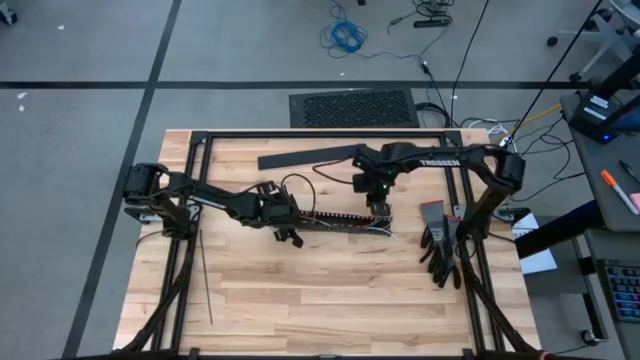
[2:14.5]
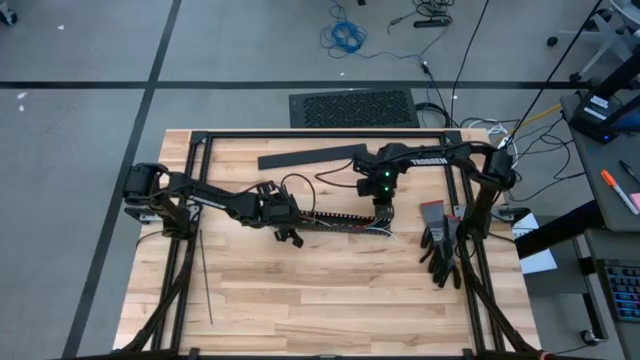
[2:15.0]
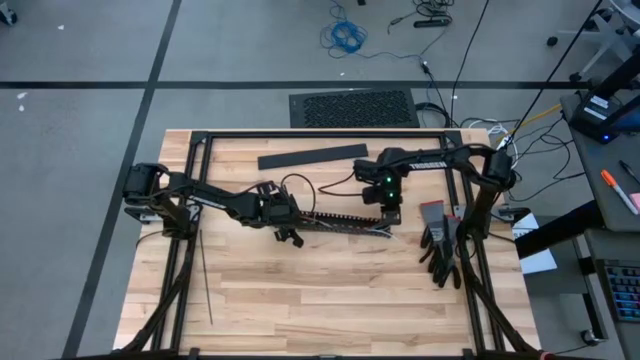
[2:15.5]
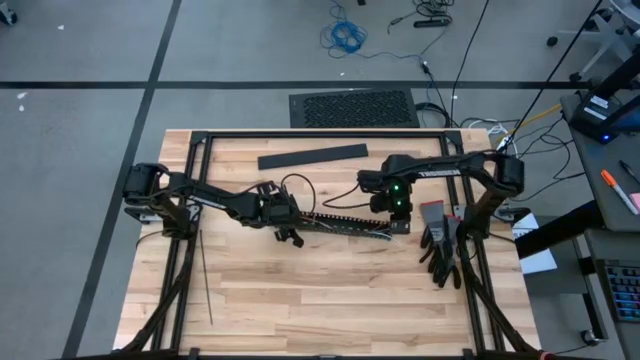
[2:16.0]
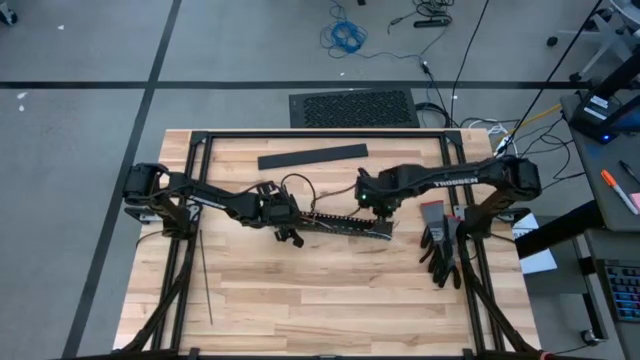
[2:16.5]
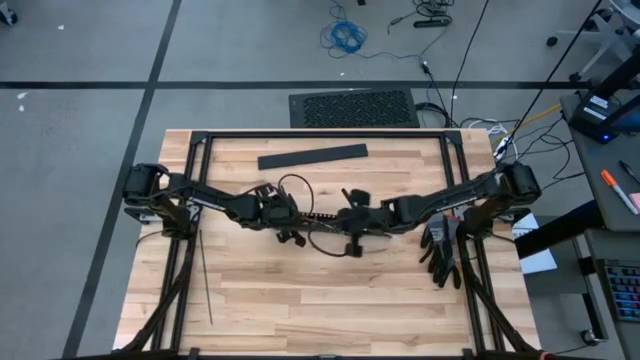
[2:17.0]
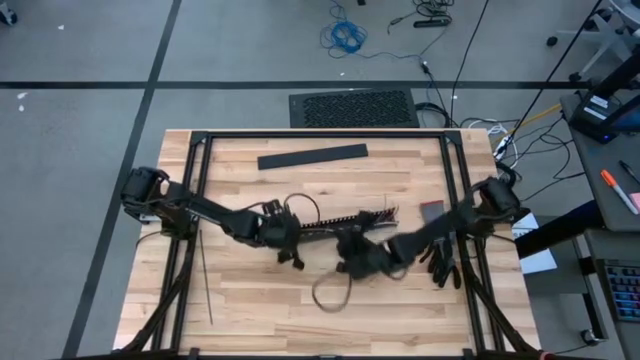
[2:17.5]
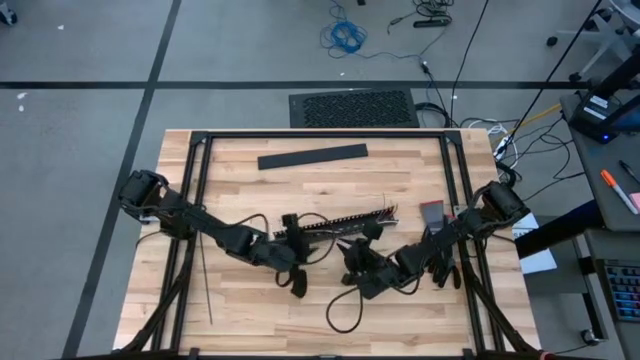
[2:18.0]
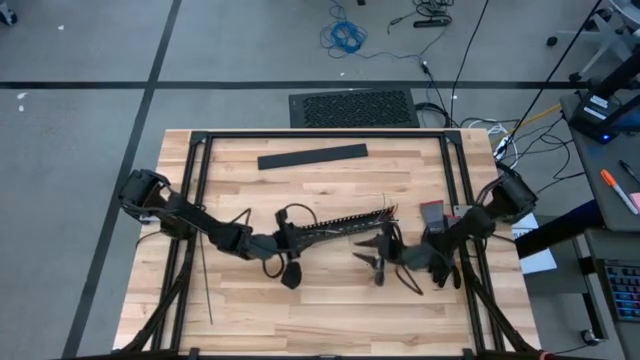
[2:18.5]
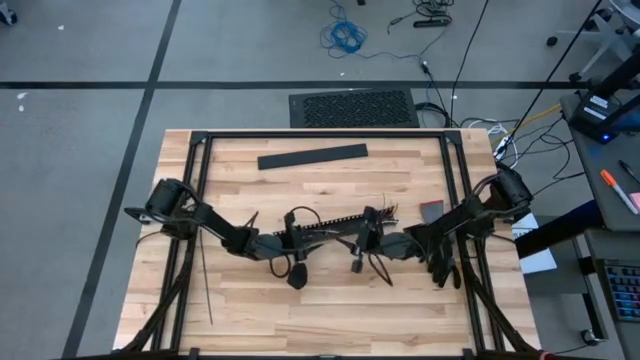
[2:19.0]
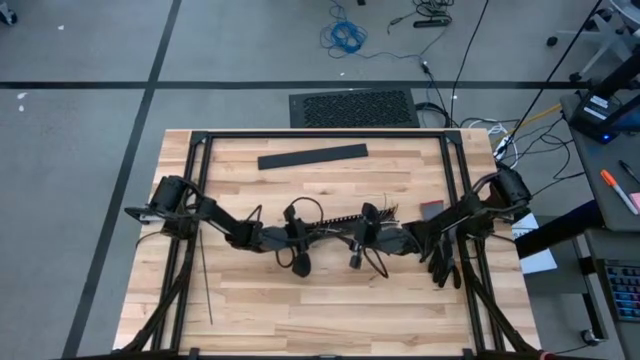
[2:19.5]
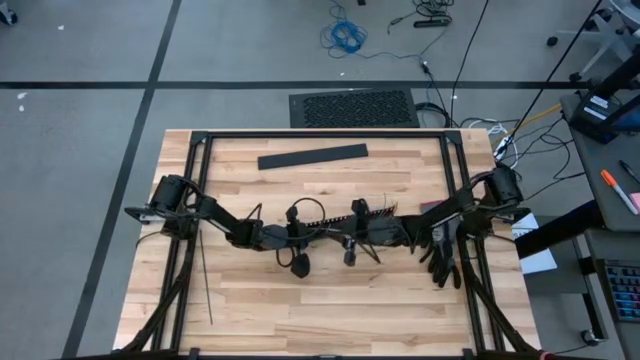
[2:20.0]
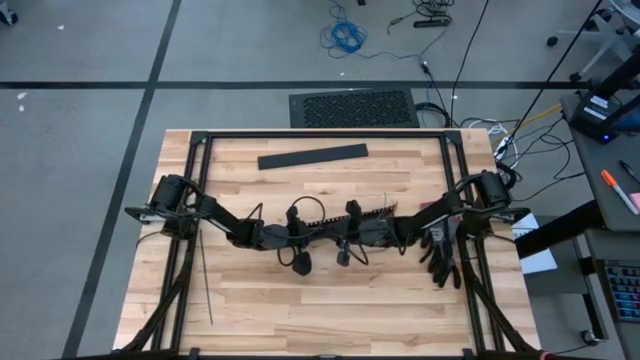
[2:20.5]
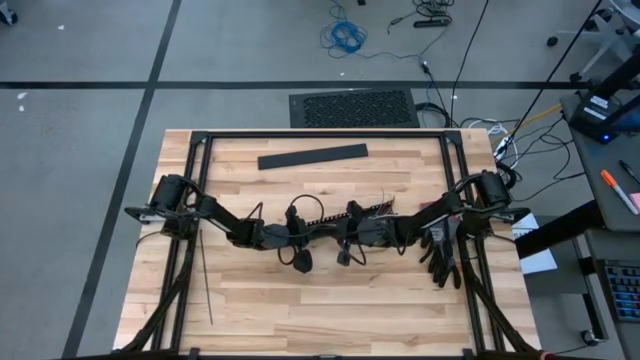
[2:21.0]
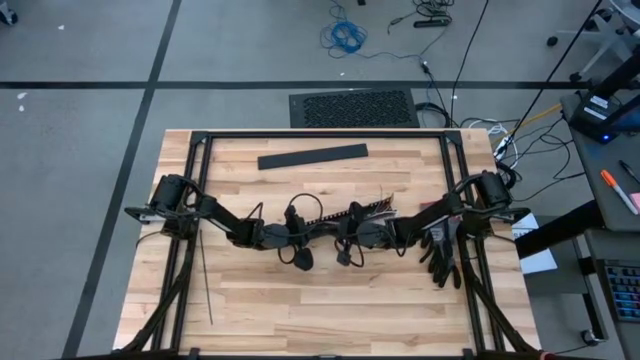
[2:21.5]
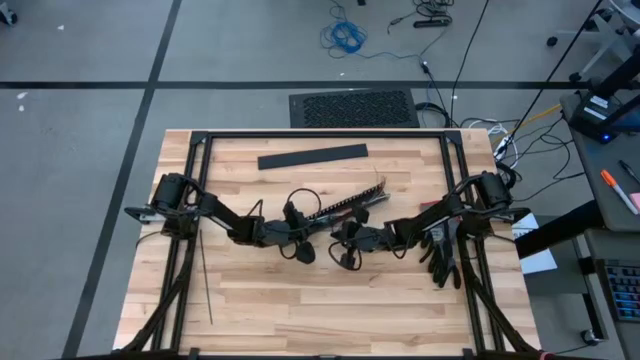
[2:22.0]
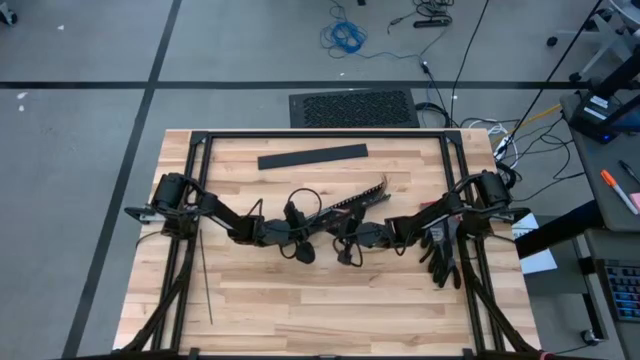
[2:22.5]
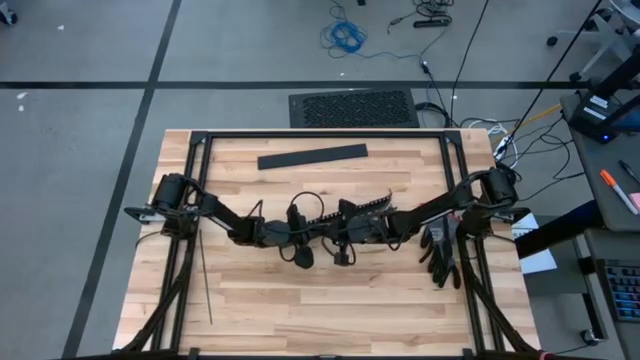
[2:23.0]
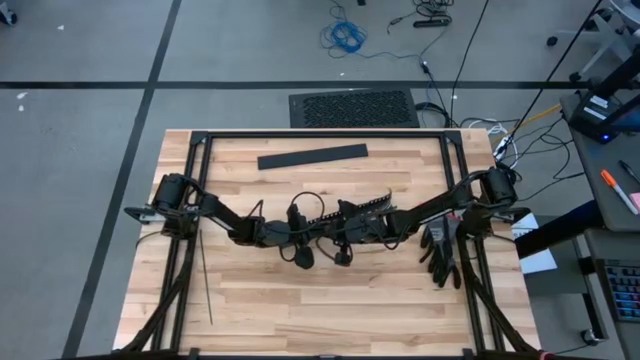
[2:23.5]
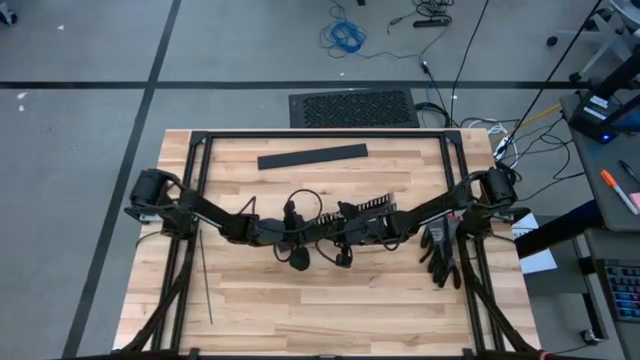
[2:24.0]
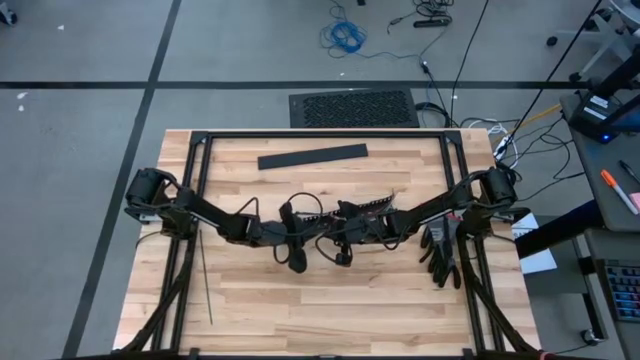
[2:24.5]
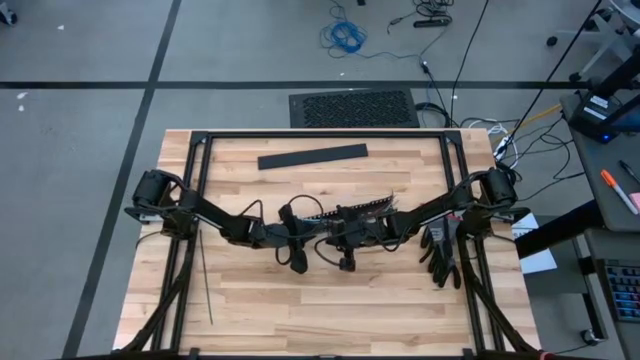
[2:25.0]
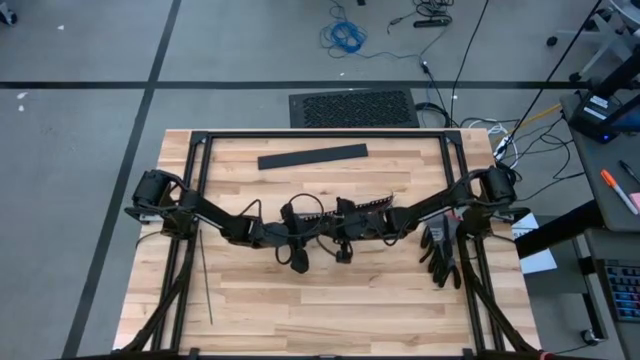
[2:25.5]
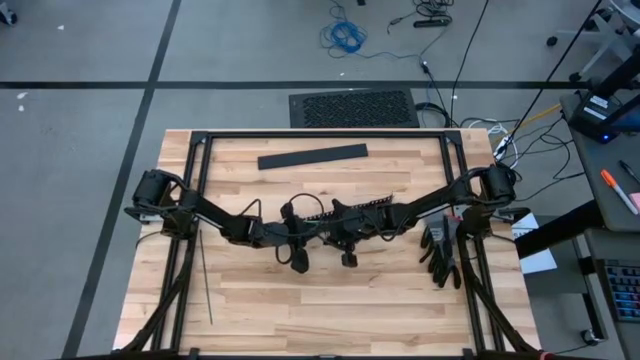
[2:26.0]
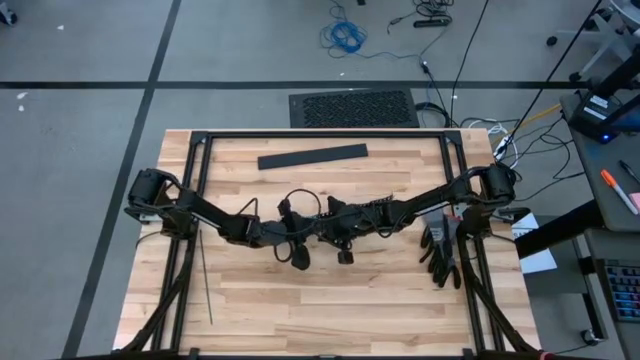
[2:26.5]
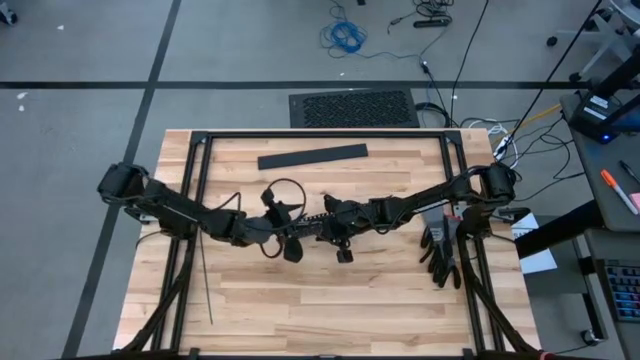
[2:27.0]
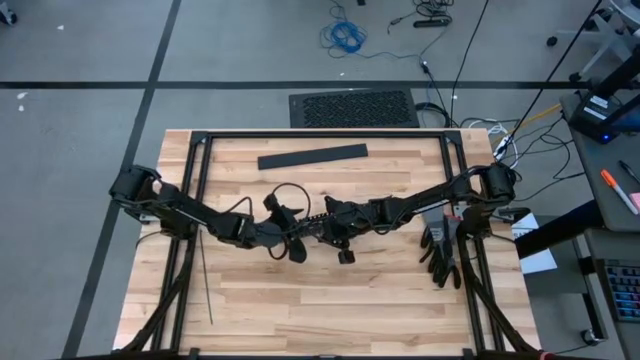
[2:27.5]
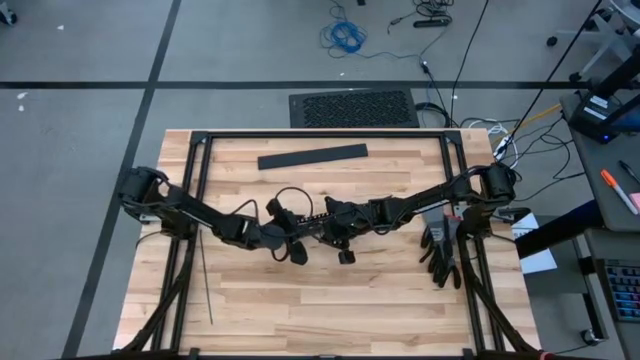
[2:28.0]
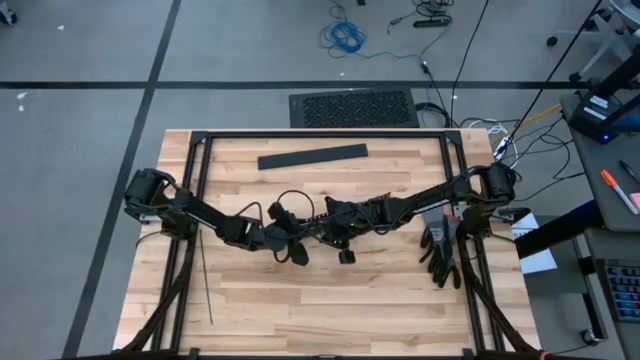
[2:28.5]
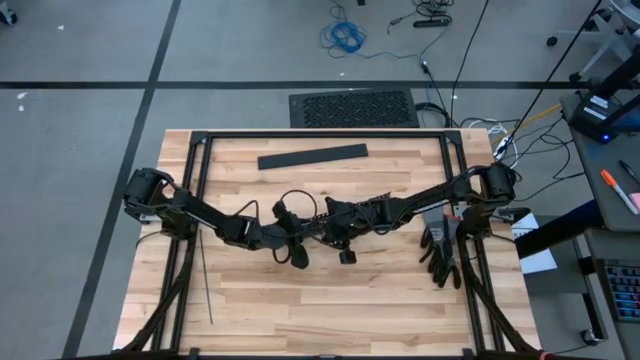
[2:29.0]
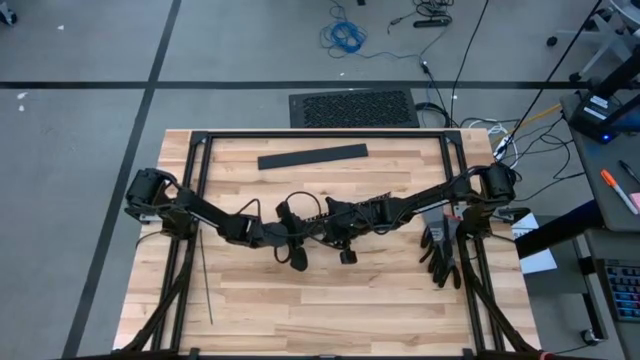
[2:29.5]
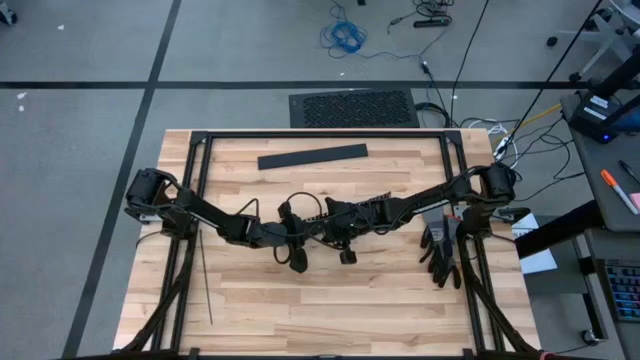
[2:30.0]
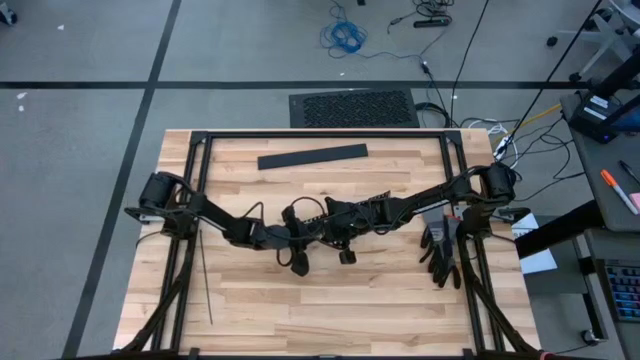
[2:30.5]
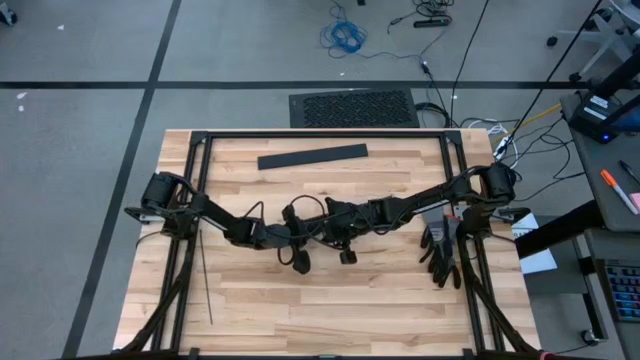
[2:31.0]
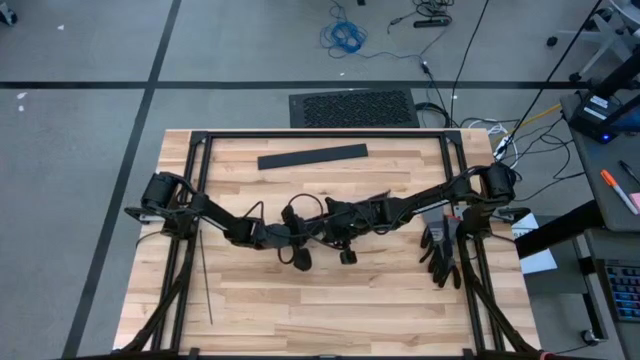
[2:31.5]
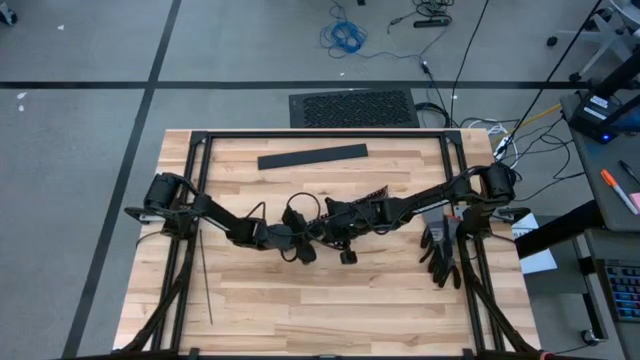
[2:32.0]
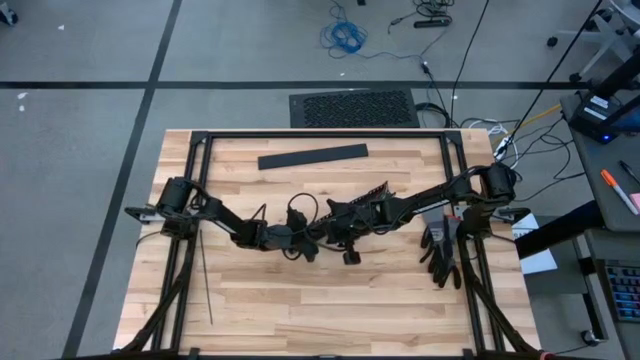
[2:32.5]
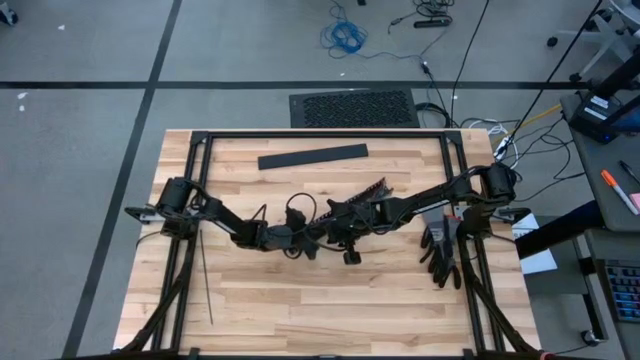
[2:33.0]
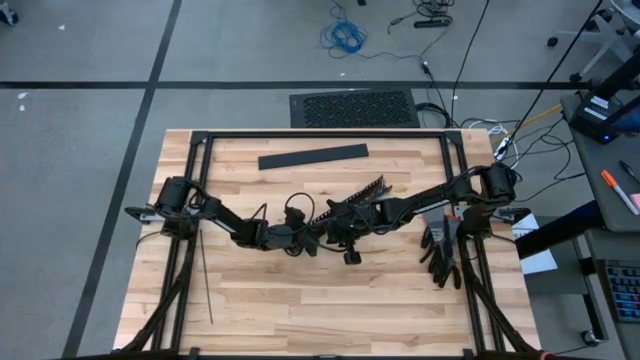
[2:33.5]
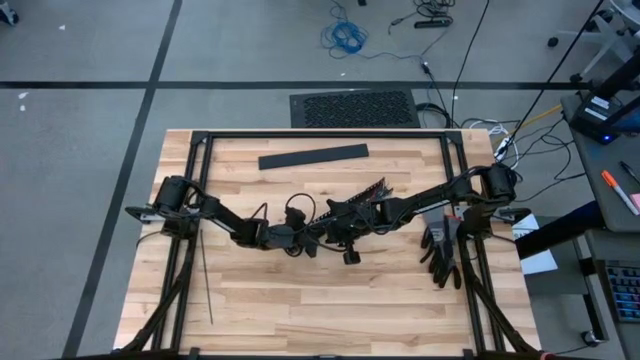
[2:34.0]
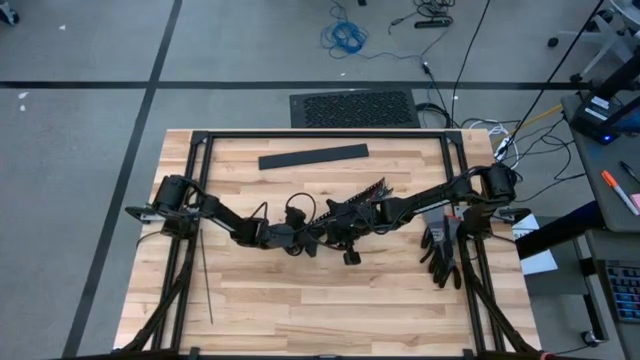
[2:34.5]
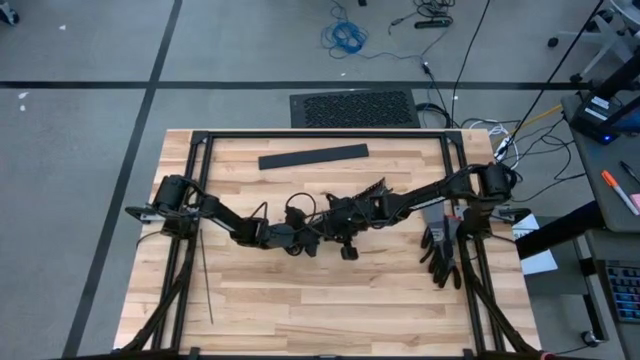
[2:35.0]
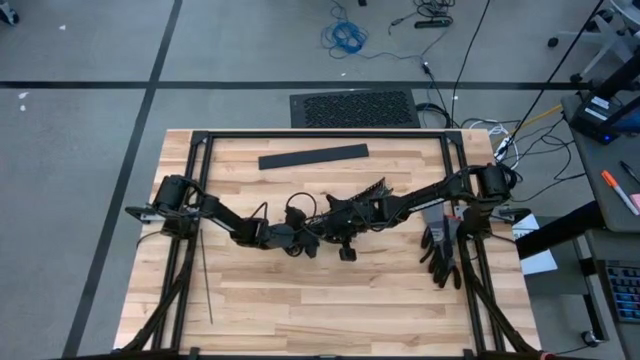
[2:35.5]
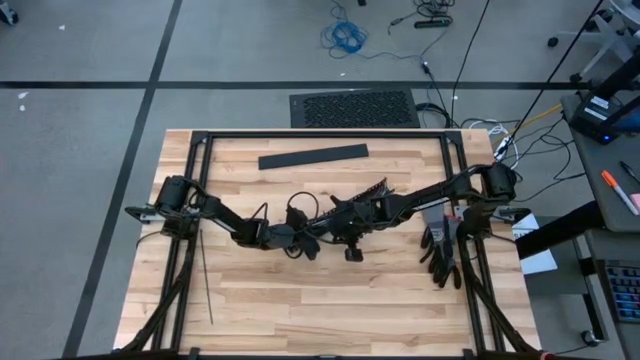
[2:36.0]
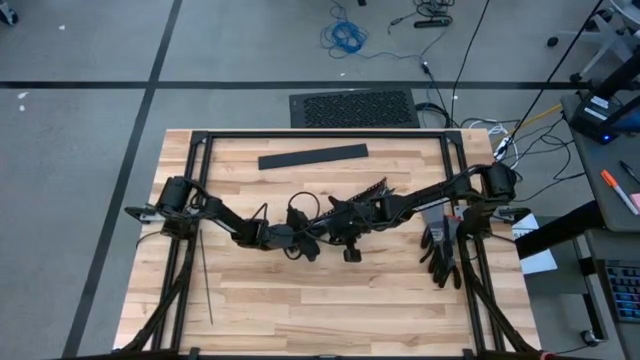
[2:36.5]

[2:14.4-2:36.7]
Task: Ziptie cables
Put the zip tied cable wires into the black cable duct
